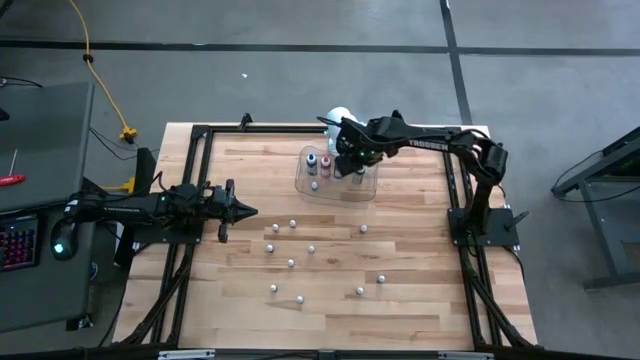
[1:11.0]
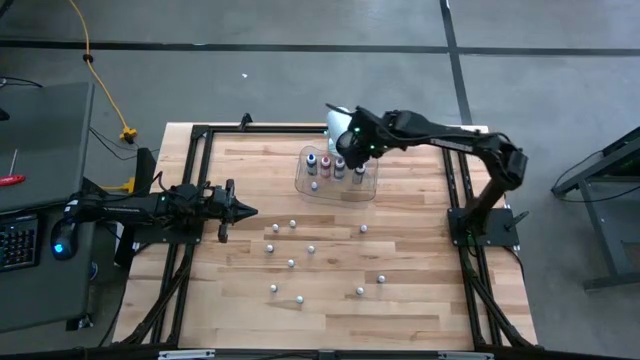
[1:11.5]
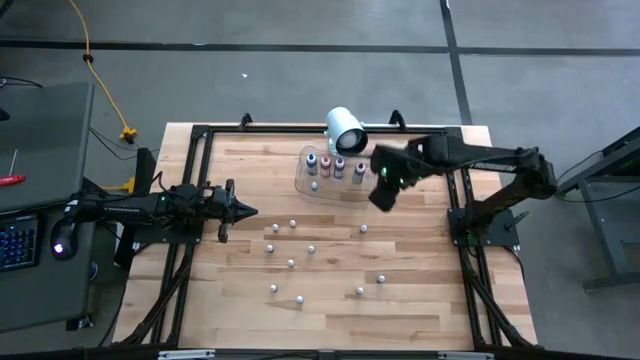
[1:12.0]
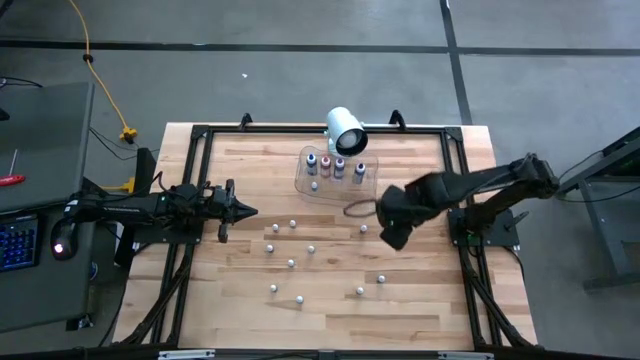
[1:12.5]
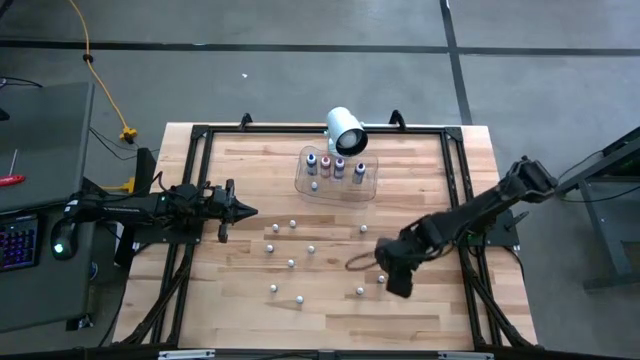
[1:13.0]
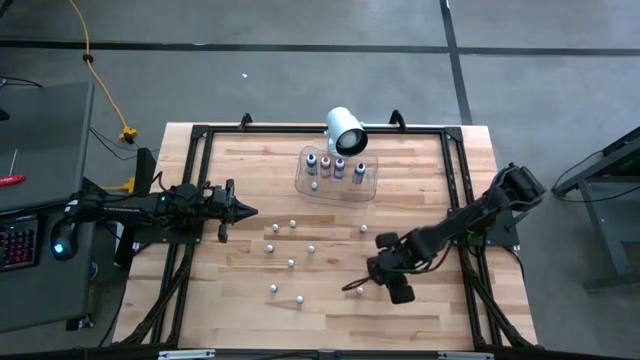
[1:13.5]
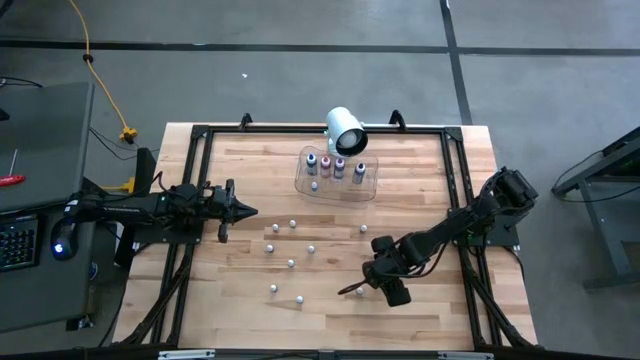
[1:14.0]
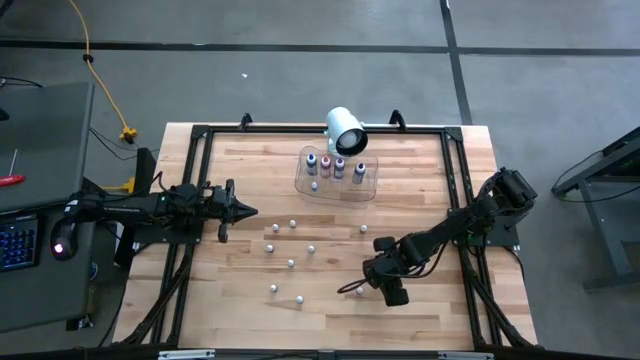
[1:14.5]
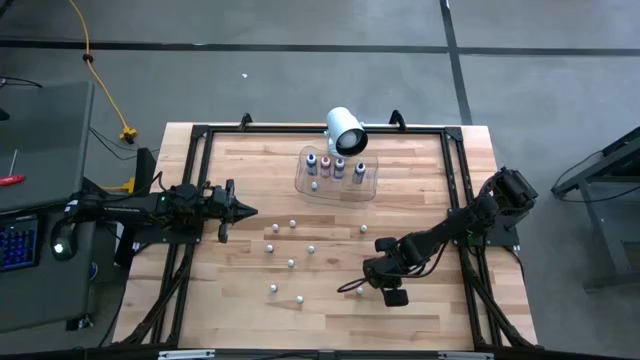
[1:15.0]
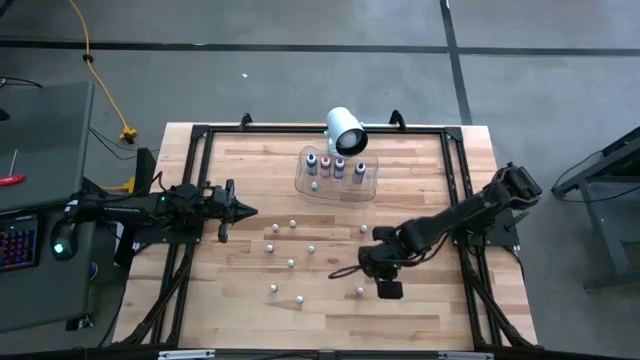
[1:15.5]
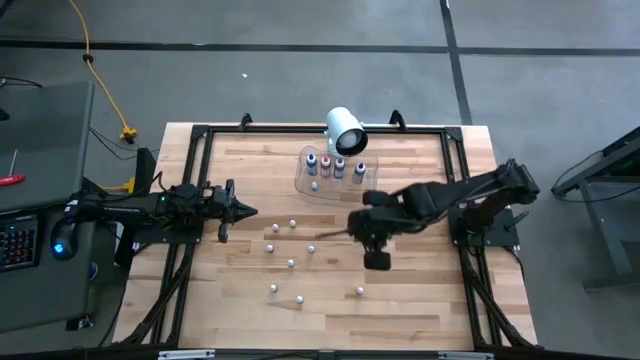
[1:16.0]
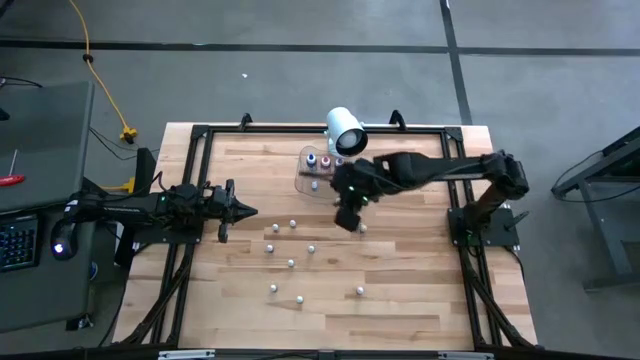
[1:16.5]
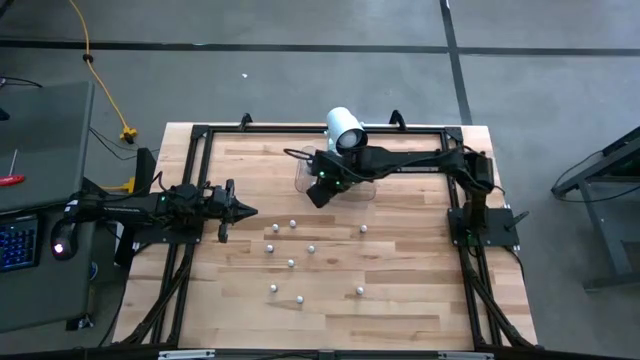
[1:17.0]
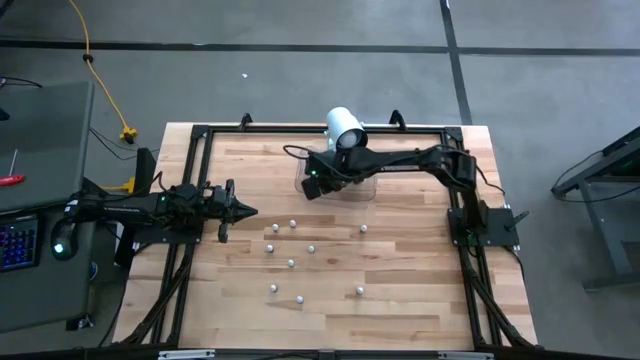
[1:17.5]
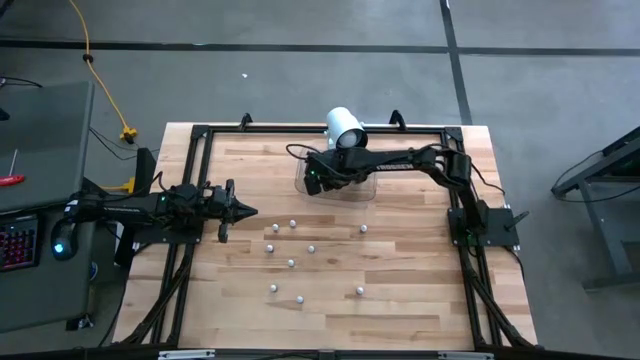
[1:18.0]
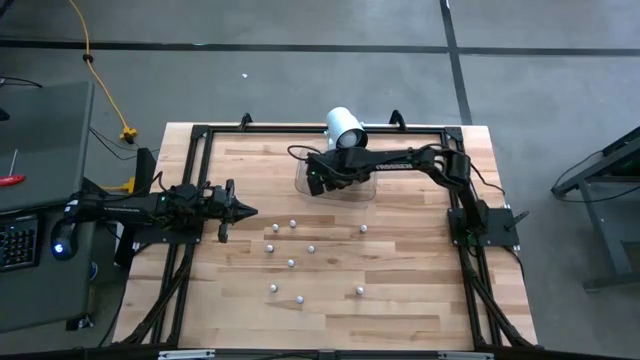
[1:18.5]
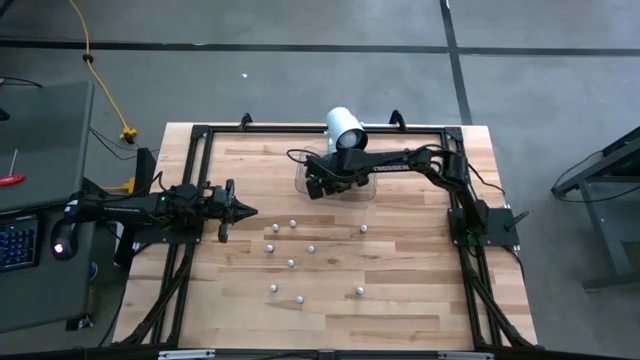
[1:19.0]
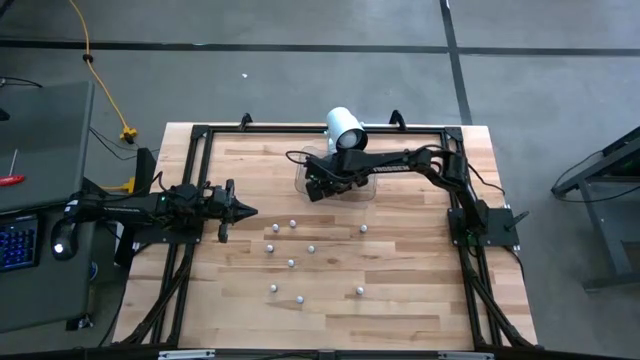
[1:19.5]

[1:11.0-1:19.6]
Task: Pick & Place food coloring
Put the small black food coloring bottle into the transparent bin

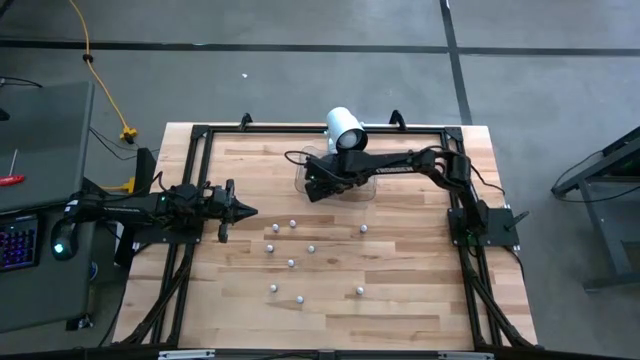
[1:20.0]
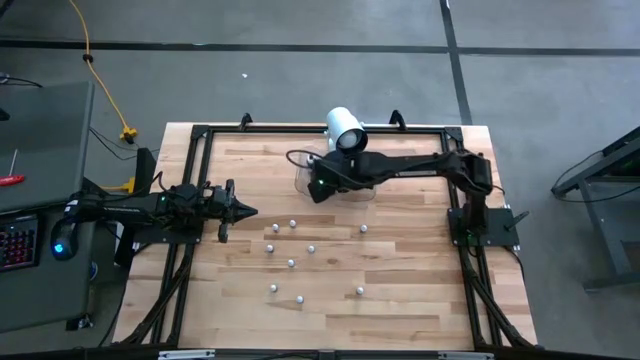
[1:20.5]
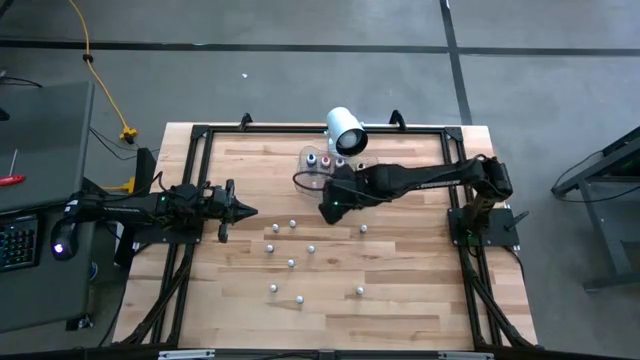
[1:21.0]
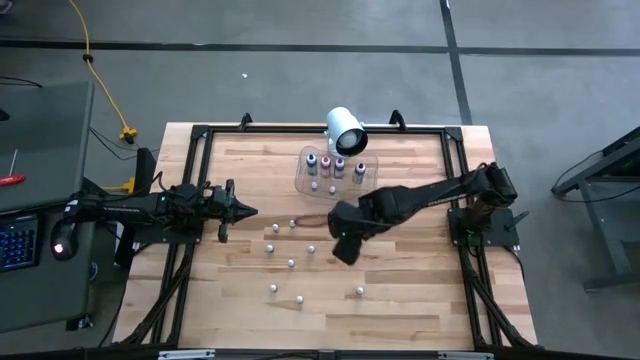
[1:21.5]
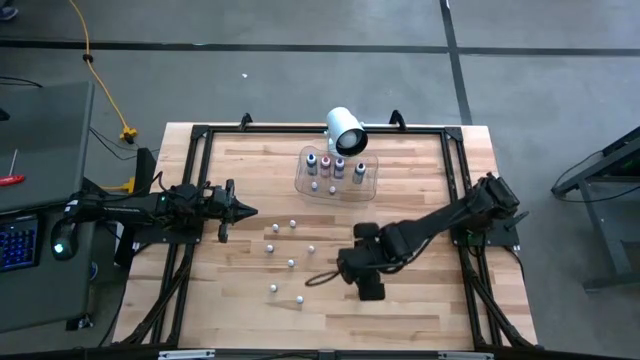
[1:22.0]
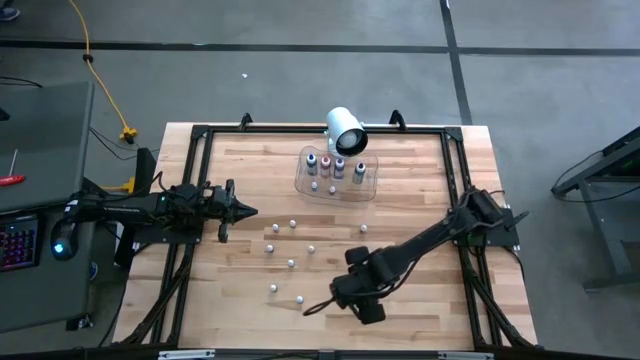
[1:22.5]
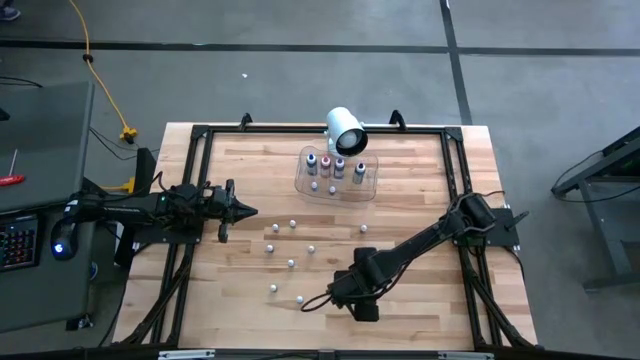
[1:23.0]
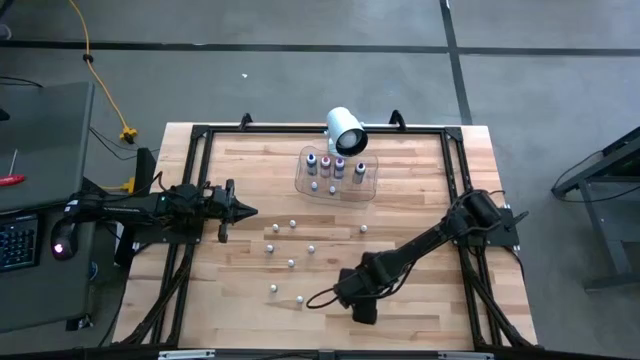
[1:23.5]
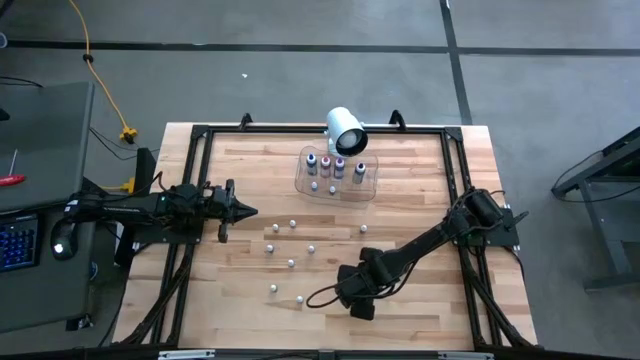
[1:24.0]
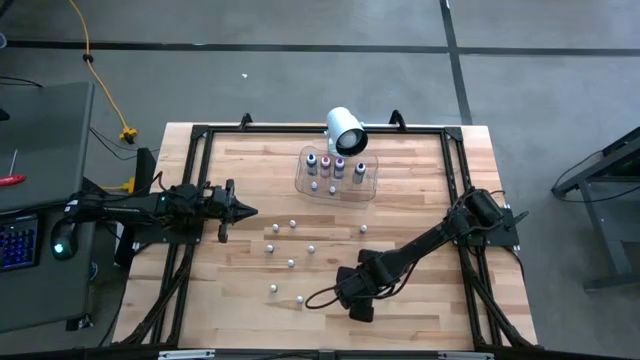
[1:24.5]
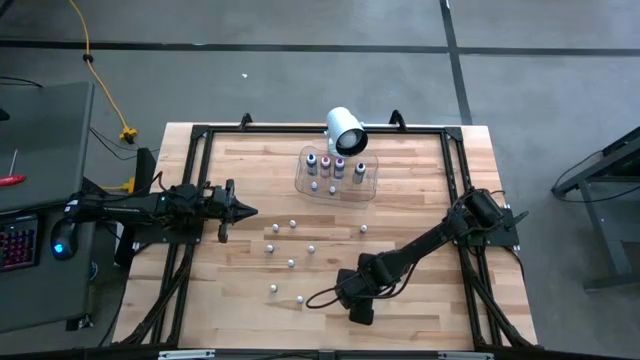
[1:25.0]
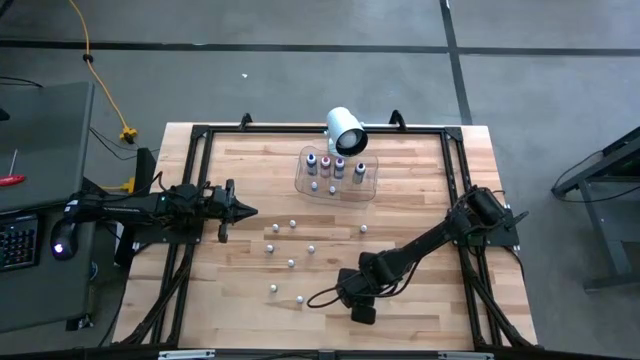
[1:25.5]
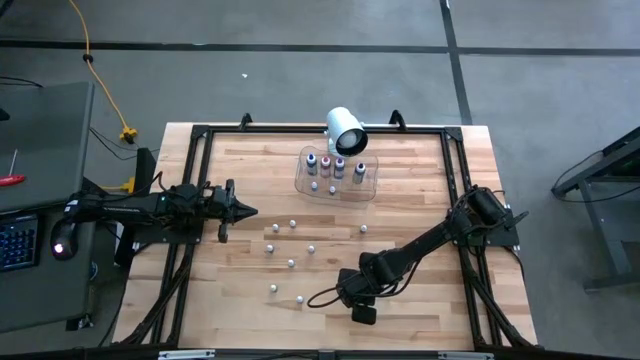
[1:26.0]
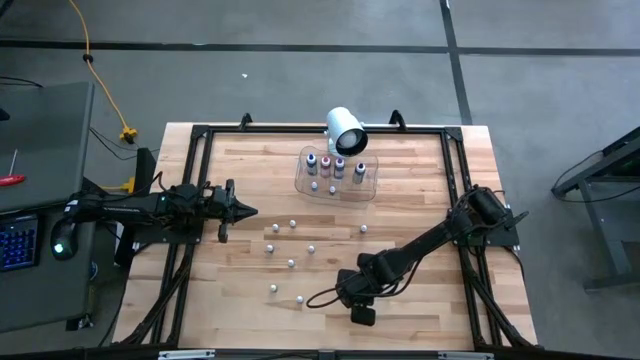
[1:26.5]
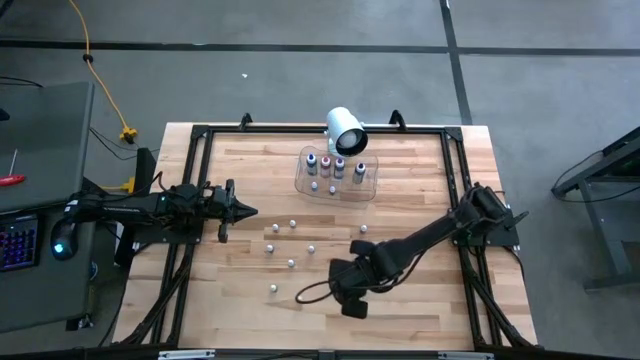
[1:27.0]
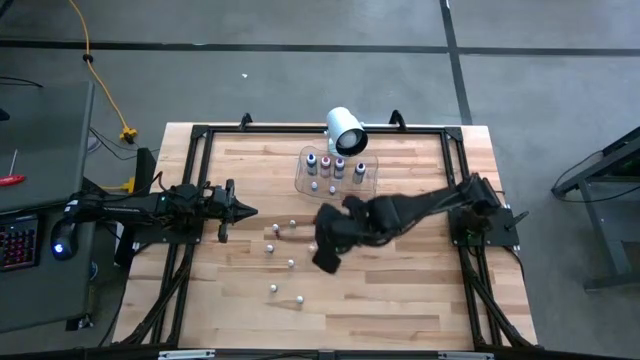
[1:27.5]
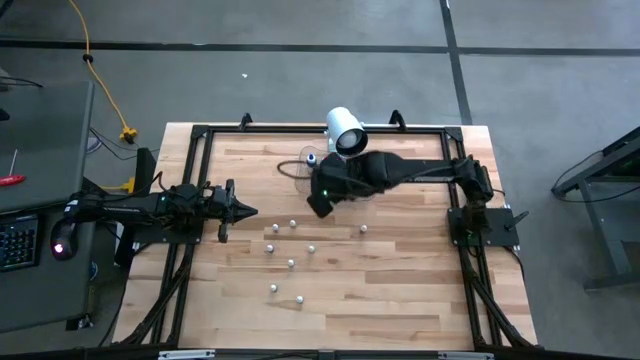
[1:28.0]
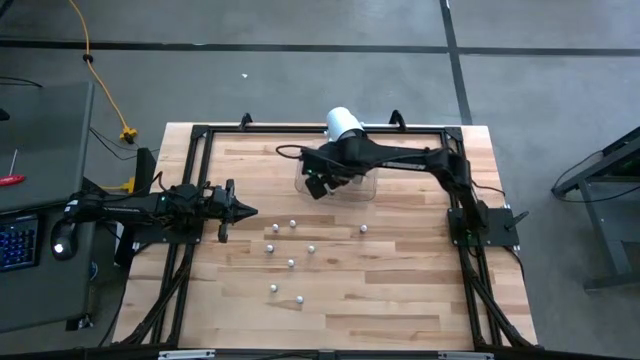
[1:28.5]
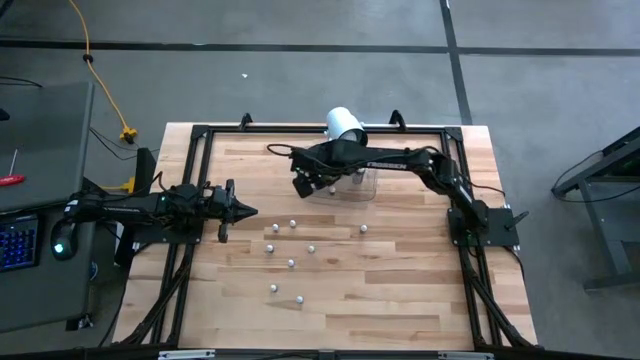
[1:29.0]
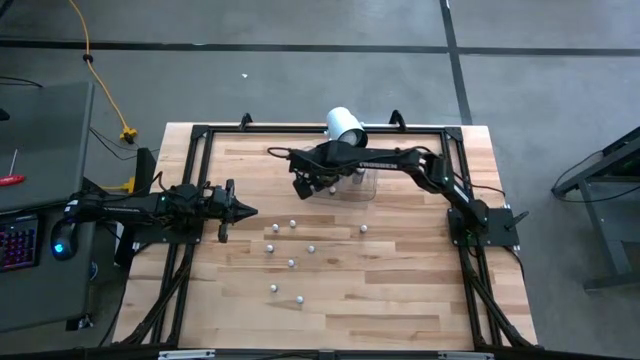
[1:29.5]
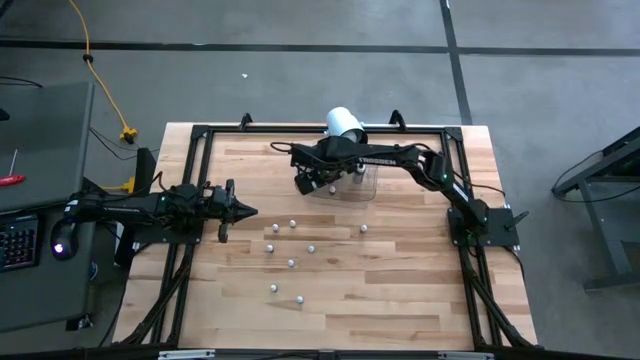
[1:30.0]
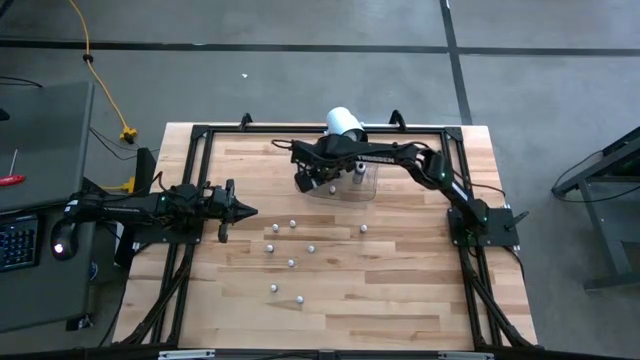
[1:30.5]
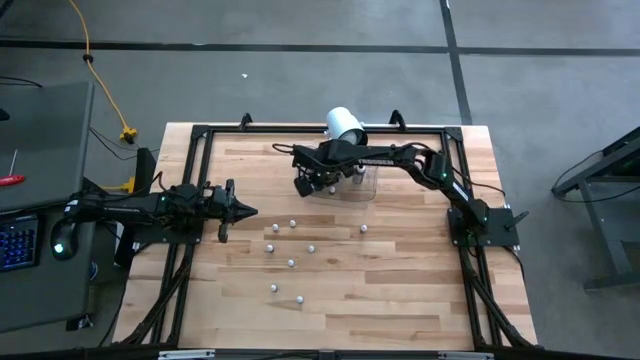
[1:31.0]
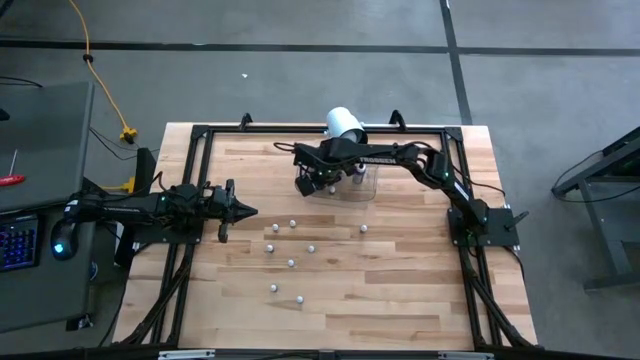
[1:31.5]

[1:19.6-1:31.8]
Put the small black food coloring bottle into the transparent bin
